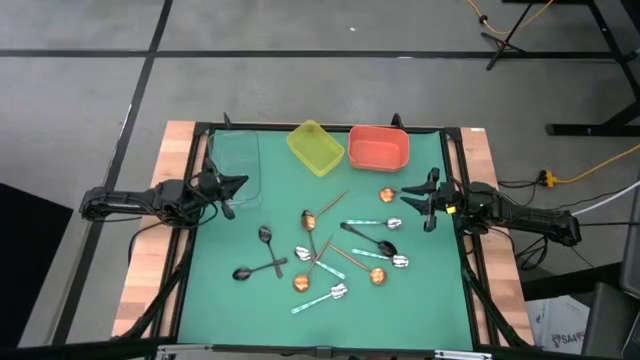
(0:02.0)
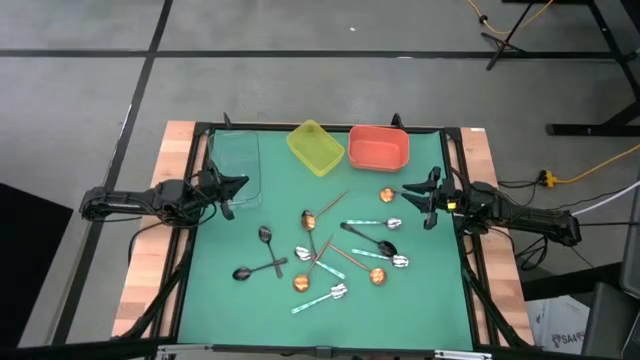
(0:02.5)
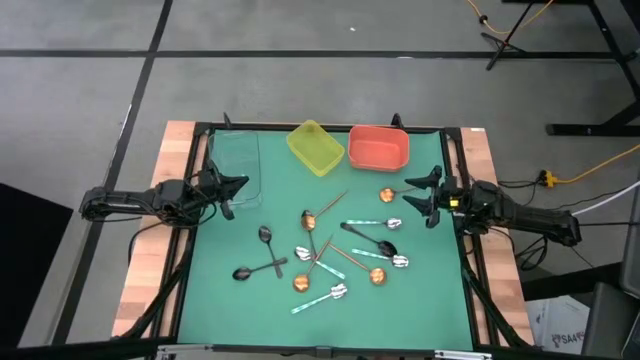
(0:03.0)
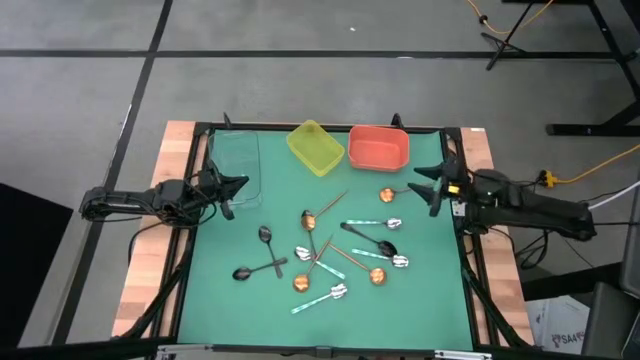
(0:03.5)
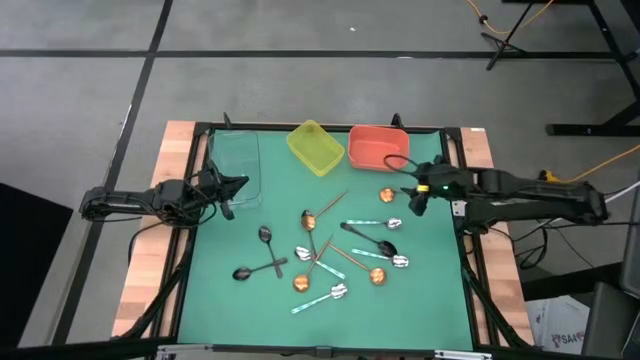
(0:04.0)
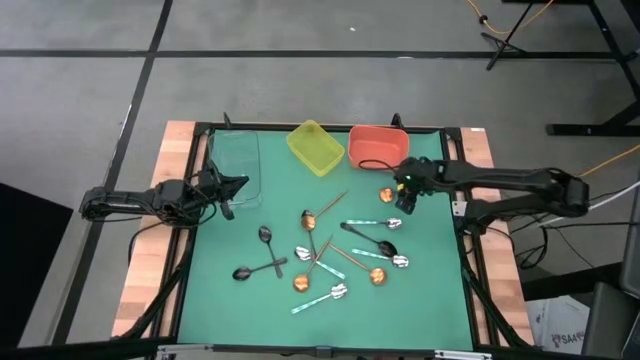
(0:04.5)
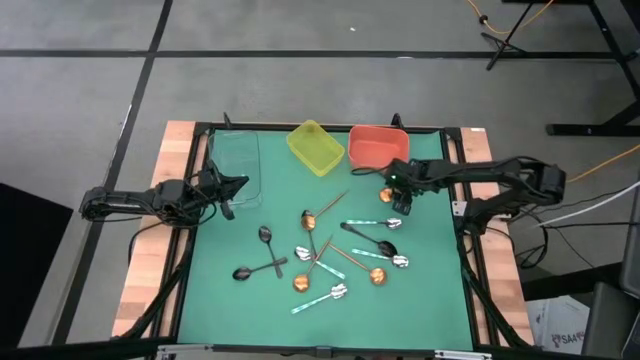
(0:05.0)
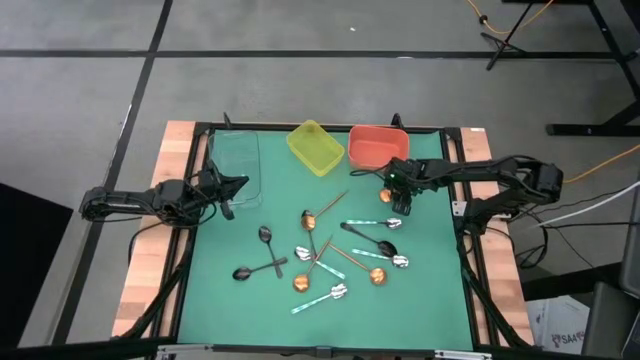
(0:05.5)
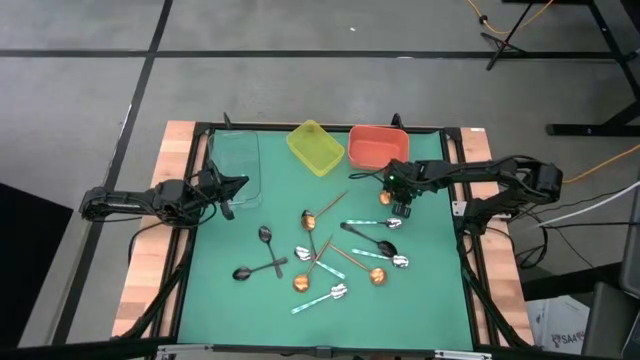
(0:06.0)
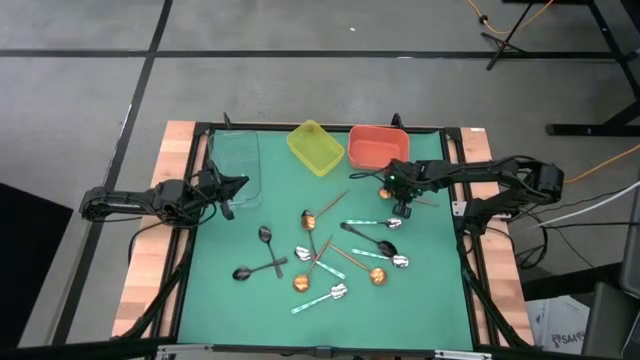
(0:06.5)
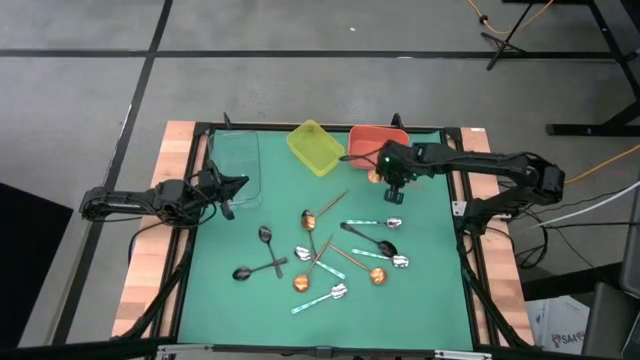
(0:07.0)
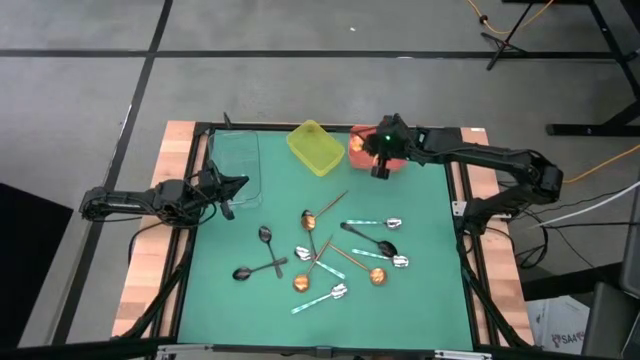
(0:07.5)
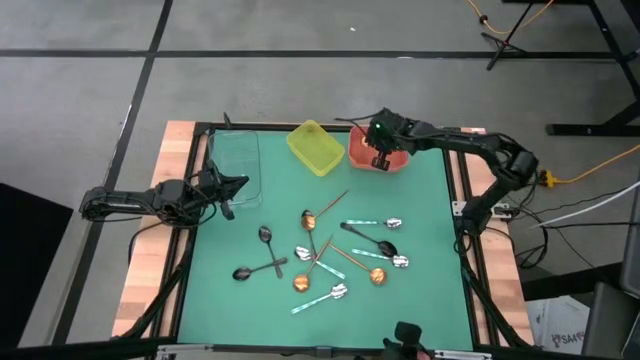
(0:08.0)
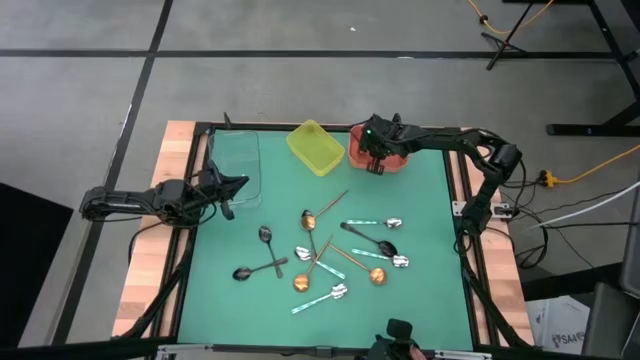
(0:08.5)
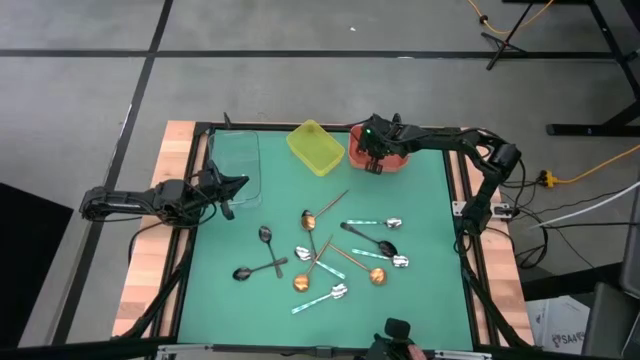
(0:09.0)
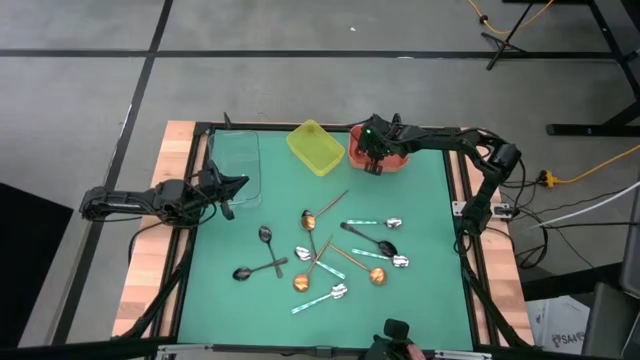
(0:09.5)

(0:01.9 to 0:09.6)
Task: Sort silverware by color (type)
Put the gold spoon into the orange bin

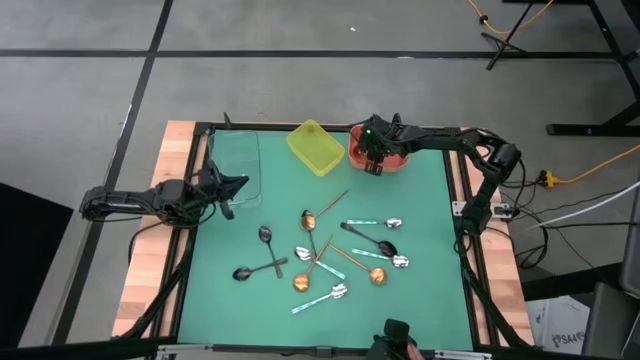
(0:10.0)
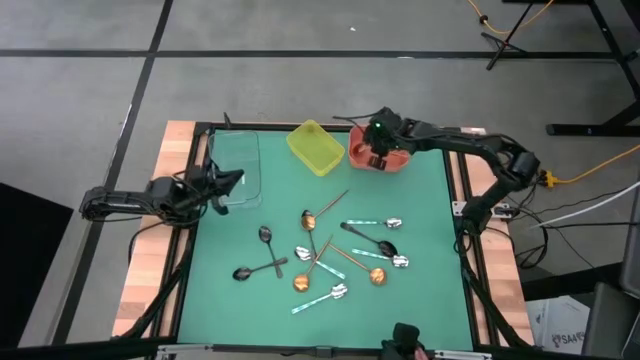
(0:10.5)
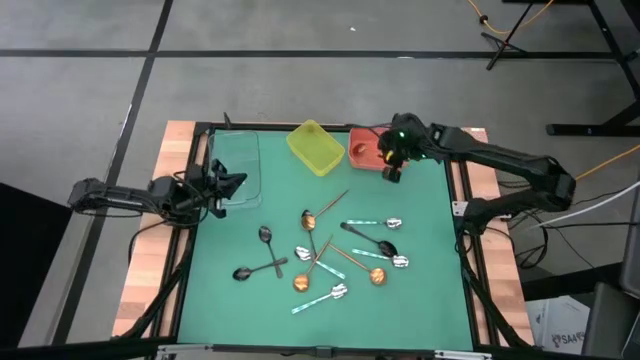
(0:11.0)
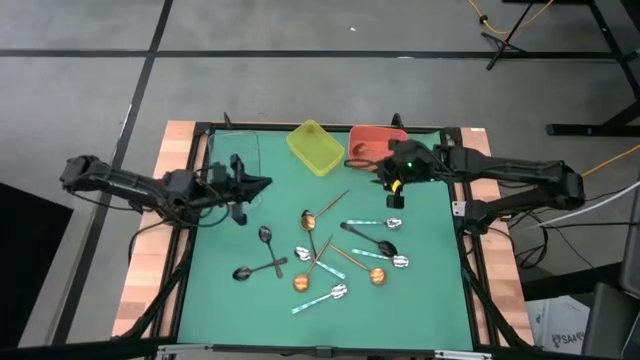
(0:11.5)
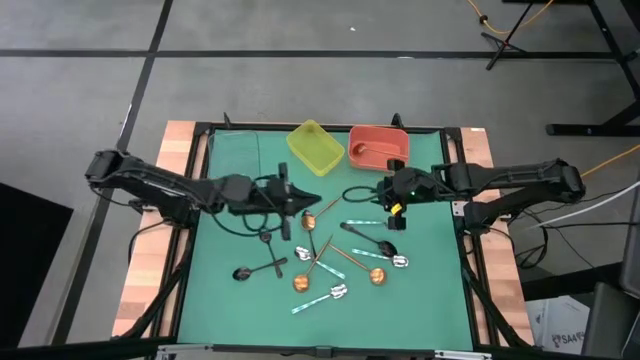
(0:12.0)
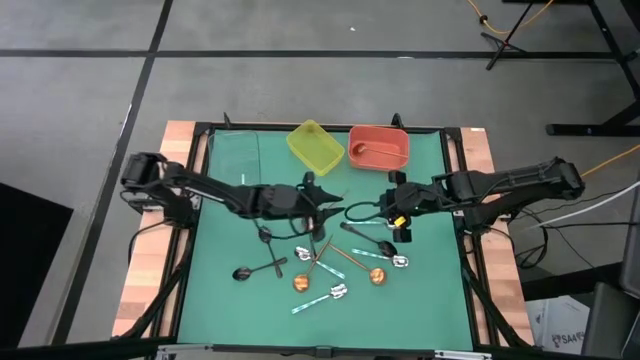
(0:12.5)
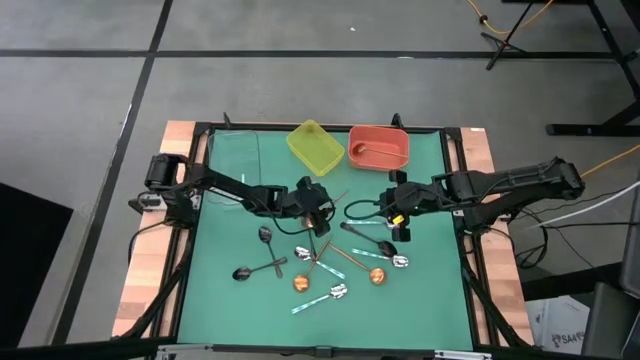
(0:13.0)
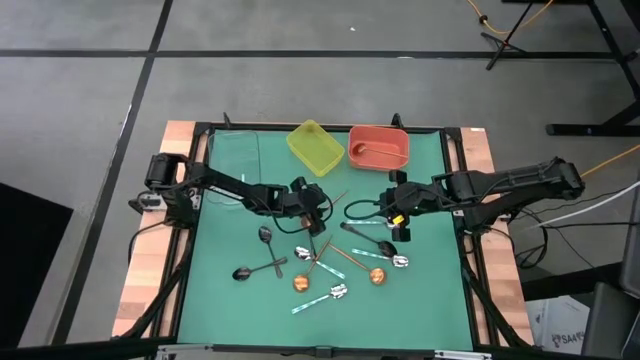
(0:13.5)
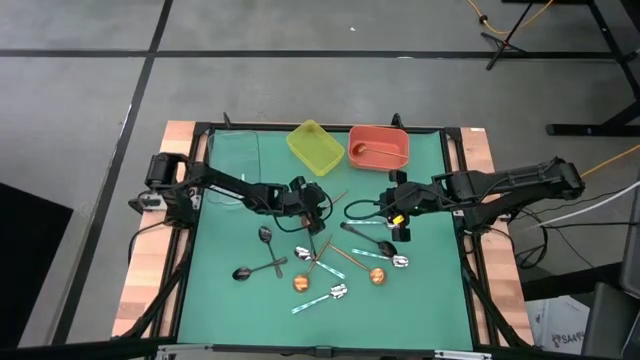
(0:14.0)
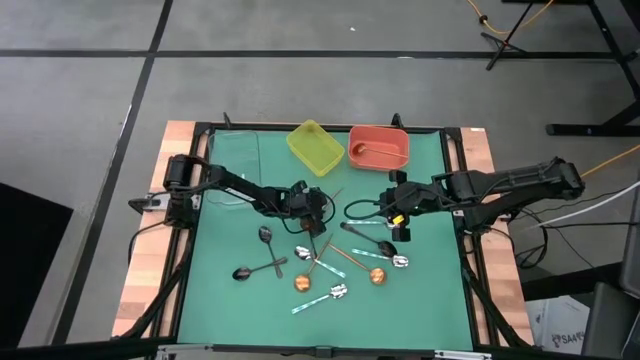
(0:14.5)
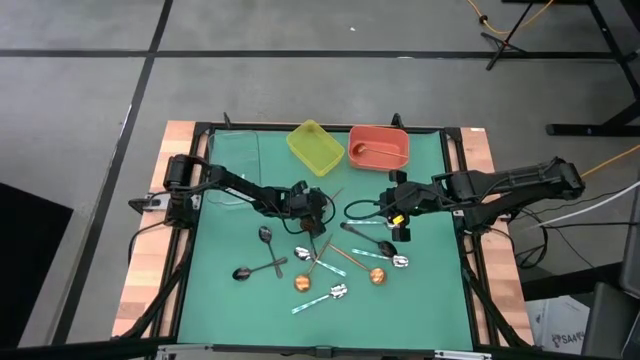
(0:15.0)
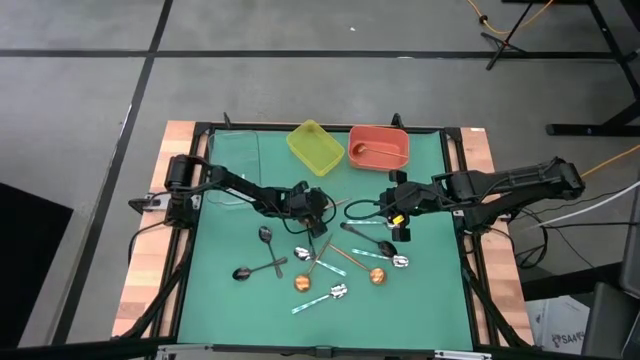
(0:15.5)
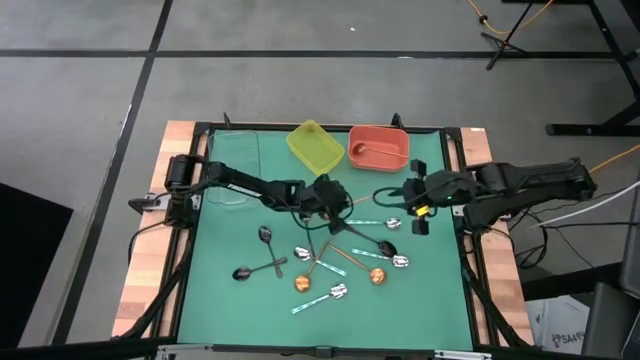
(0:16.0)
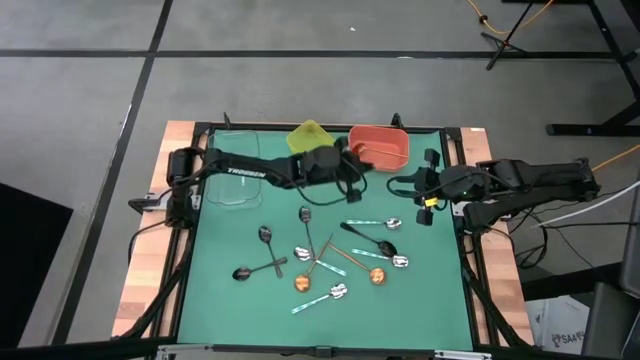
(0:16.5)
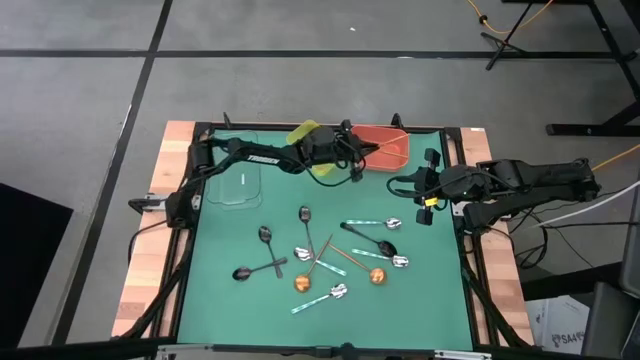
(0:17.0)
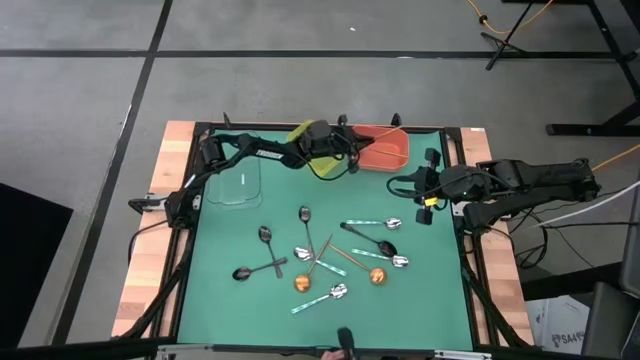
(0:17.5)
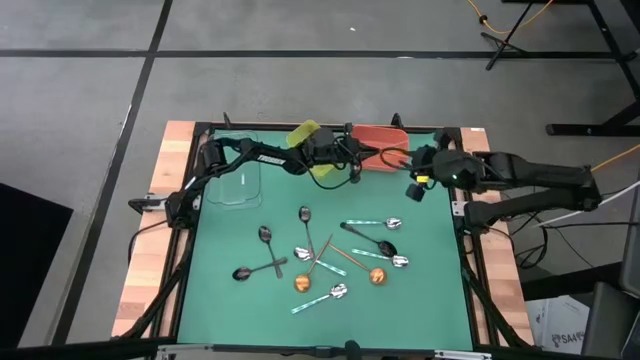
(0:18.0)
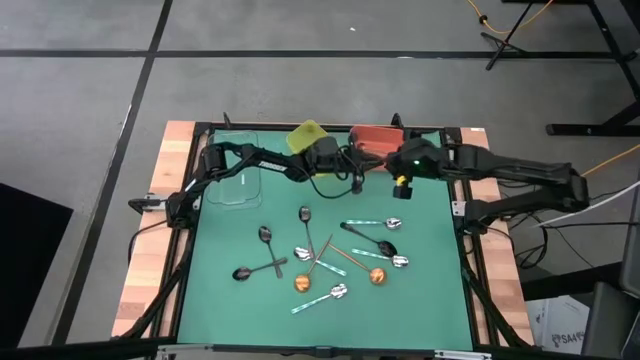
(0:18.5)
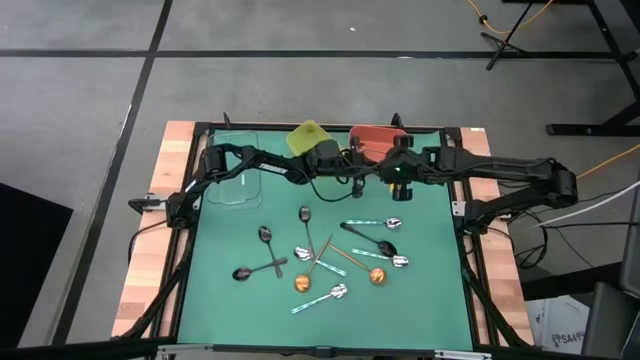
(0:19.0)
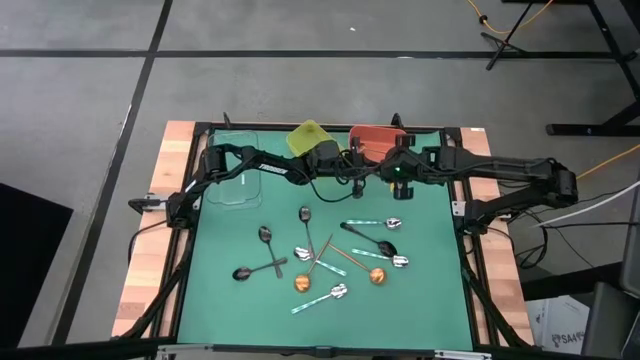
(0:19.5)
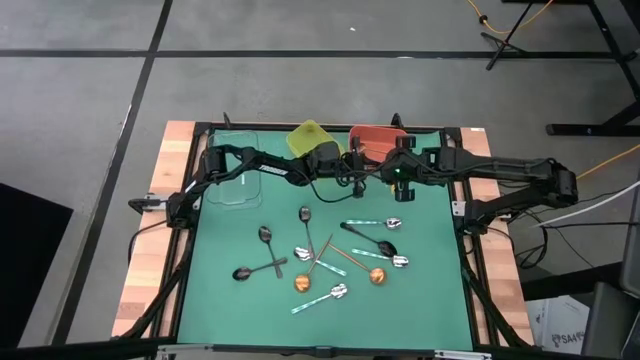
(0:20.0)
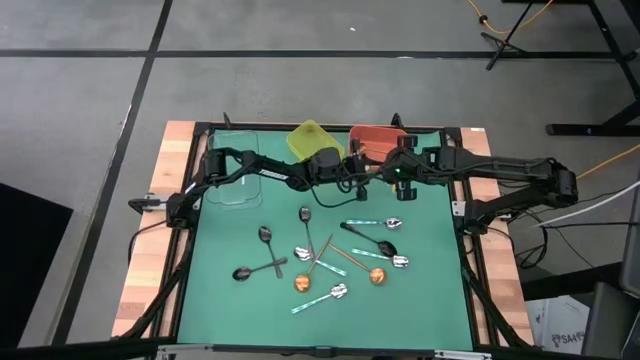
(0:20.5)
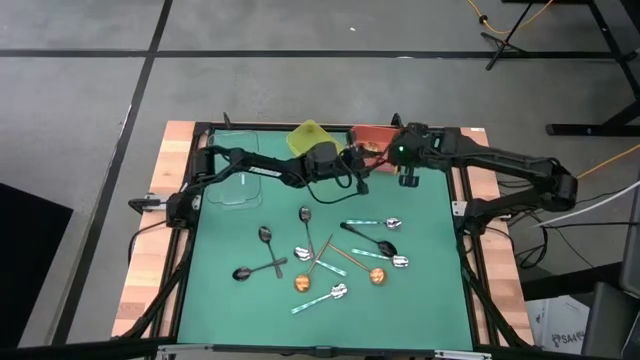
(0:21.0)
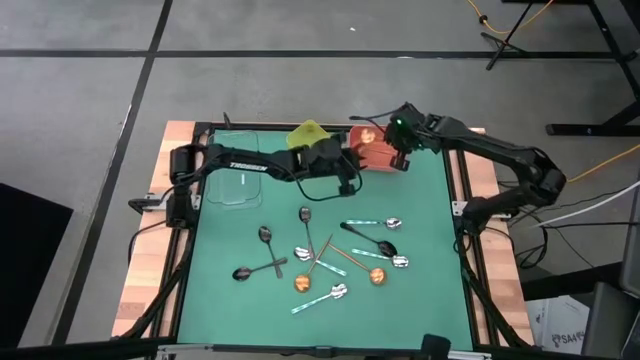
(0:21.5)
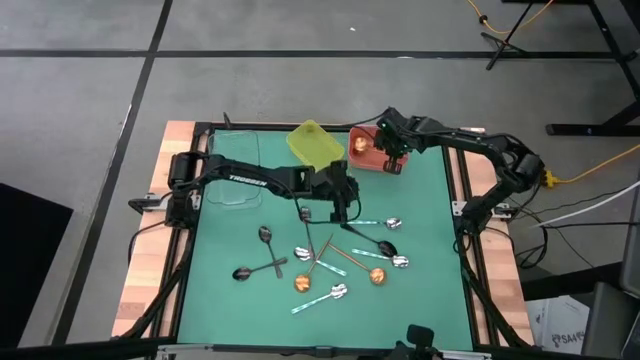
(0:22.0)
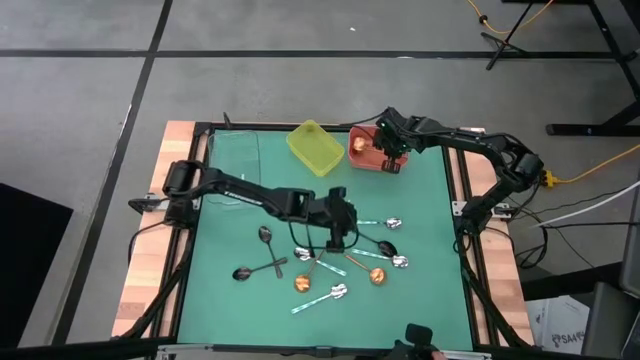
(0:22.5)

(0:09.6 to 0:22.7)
Put the gold spoon into the orange bin
